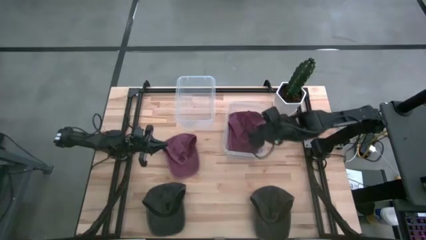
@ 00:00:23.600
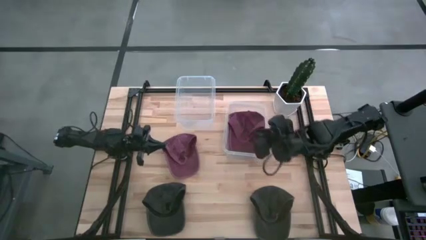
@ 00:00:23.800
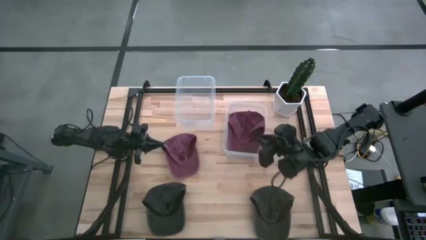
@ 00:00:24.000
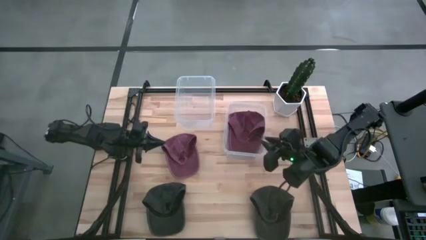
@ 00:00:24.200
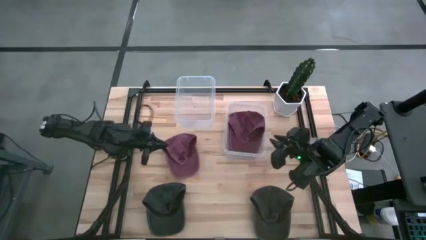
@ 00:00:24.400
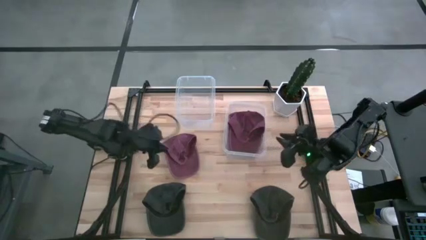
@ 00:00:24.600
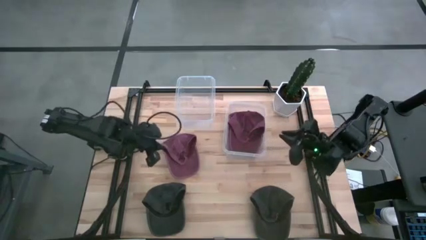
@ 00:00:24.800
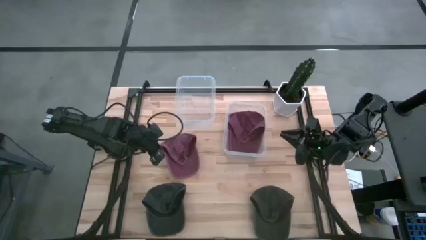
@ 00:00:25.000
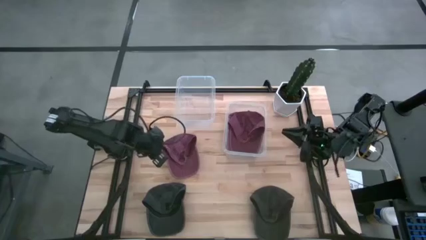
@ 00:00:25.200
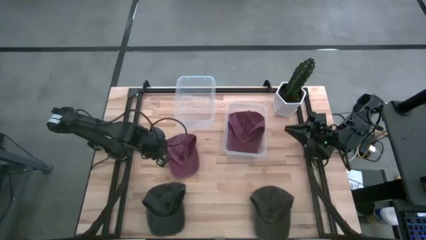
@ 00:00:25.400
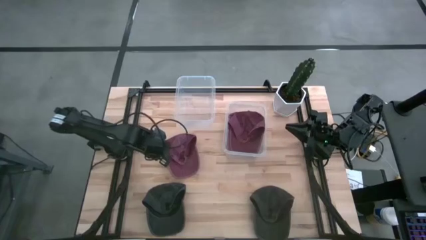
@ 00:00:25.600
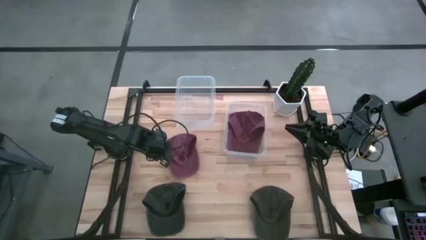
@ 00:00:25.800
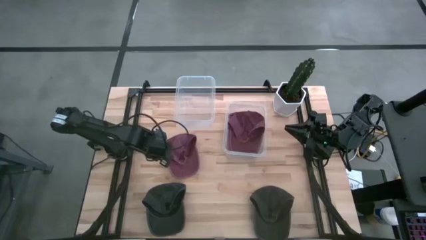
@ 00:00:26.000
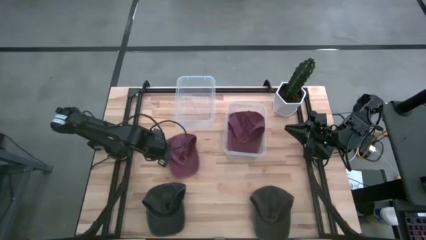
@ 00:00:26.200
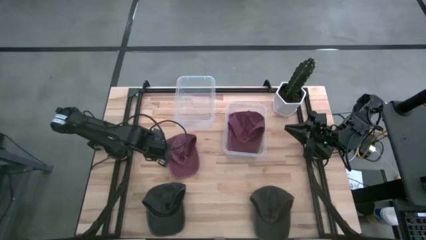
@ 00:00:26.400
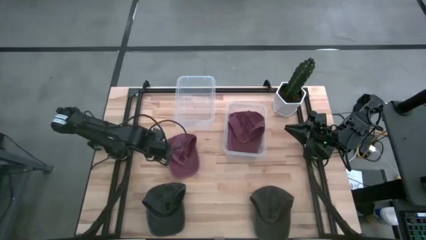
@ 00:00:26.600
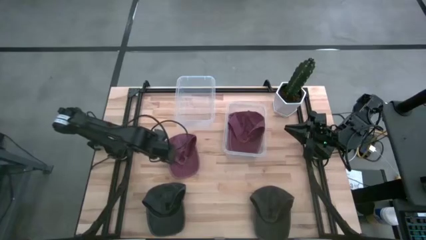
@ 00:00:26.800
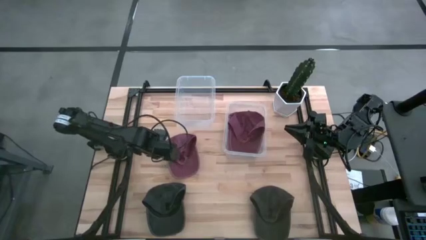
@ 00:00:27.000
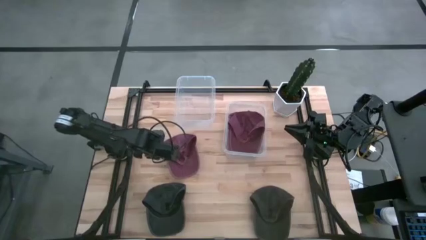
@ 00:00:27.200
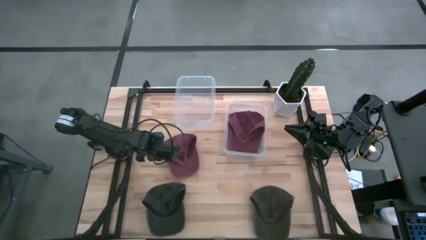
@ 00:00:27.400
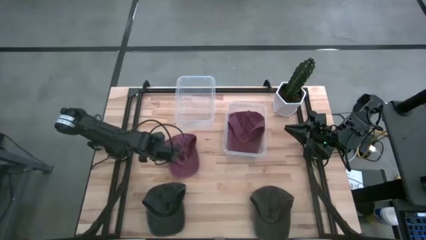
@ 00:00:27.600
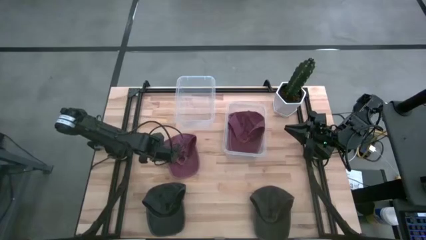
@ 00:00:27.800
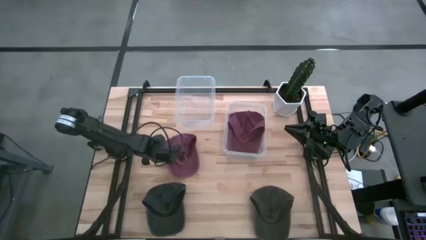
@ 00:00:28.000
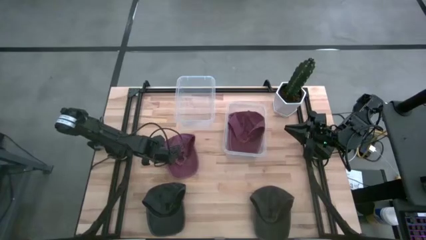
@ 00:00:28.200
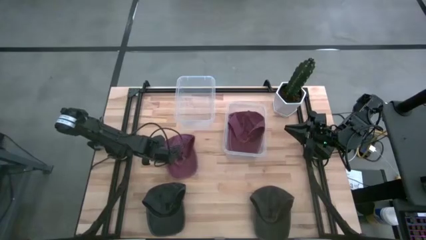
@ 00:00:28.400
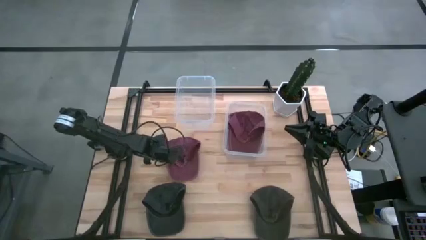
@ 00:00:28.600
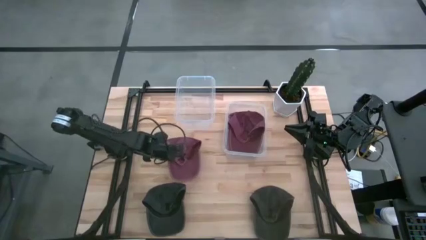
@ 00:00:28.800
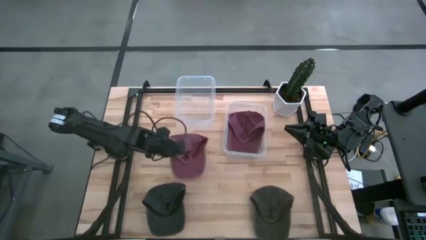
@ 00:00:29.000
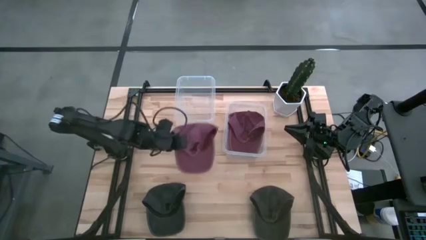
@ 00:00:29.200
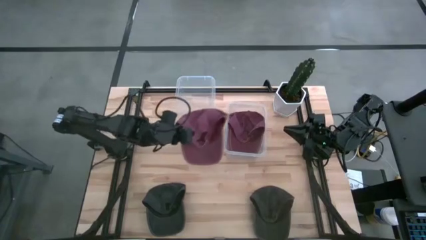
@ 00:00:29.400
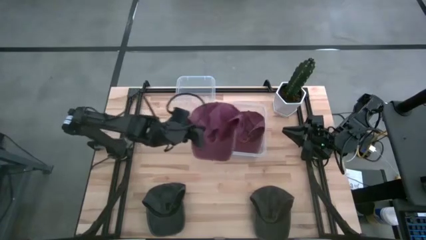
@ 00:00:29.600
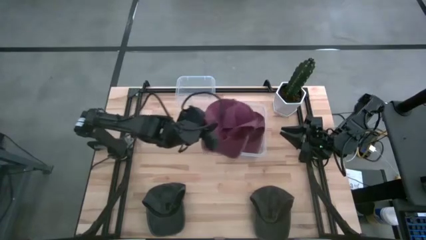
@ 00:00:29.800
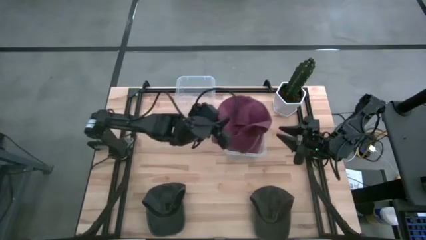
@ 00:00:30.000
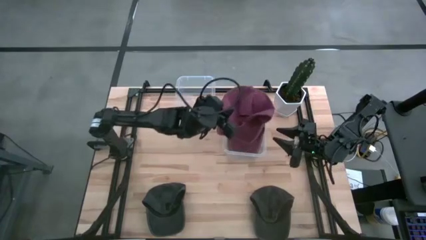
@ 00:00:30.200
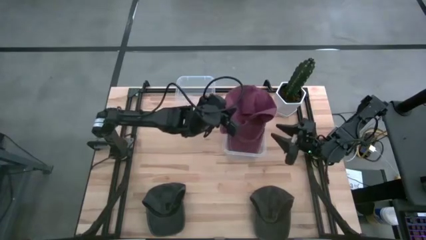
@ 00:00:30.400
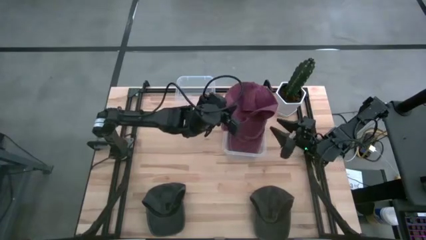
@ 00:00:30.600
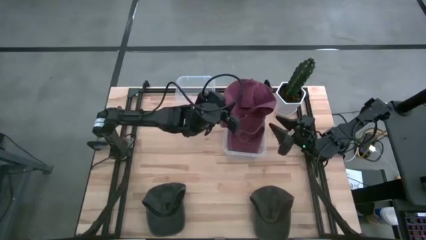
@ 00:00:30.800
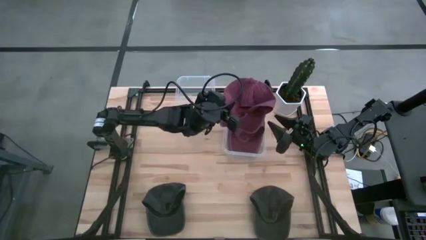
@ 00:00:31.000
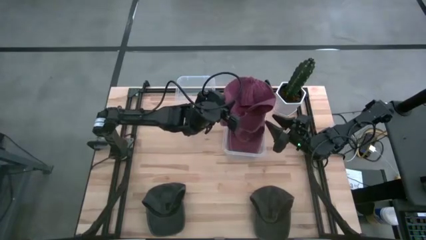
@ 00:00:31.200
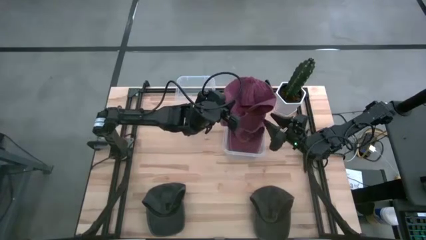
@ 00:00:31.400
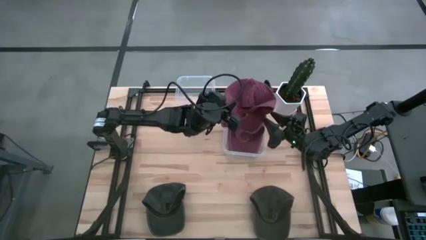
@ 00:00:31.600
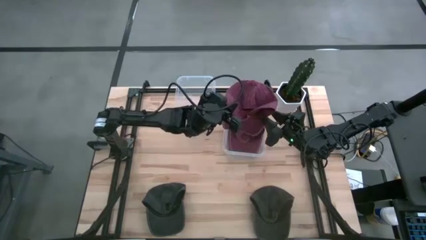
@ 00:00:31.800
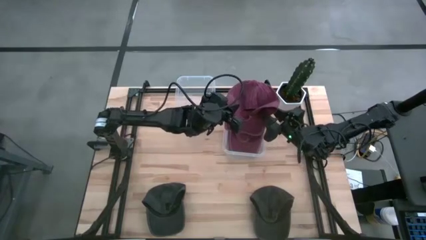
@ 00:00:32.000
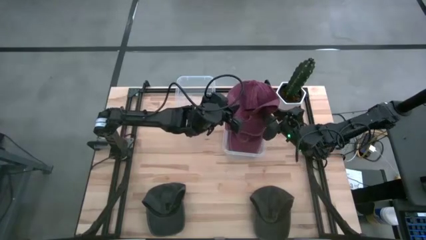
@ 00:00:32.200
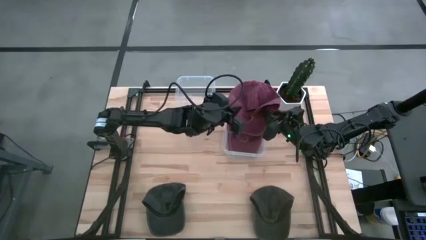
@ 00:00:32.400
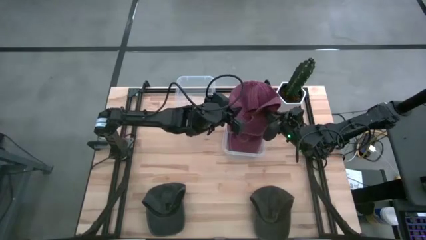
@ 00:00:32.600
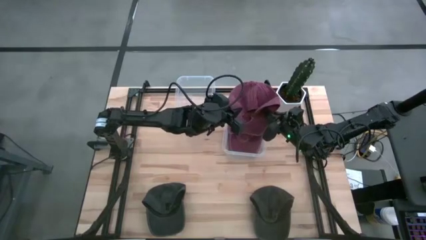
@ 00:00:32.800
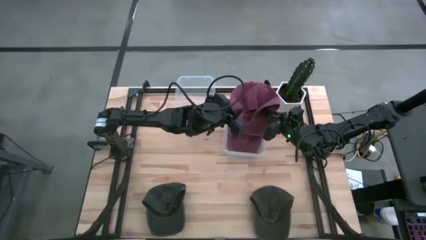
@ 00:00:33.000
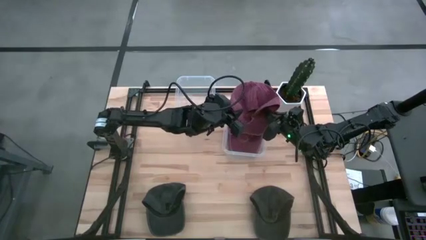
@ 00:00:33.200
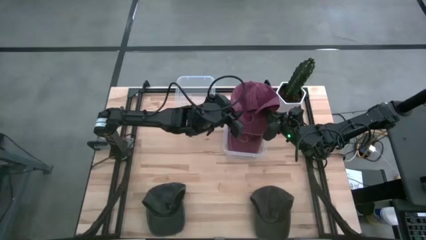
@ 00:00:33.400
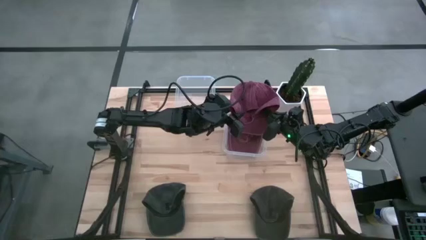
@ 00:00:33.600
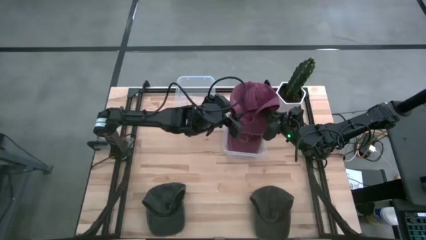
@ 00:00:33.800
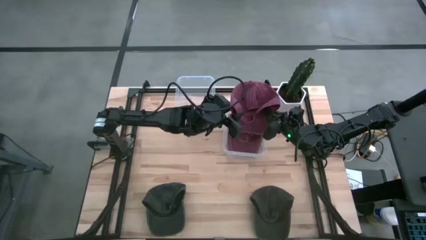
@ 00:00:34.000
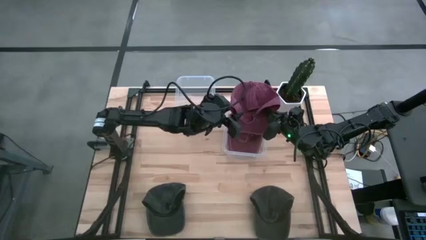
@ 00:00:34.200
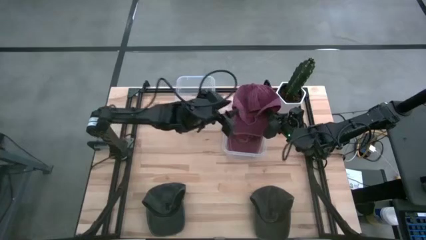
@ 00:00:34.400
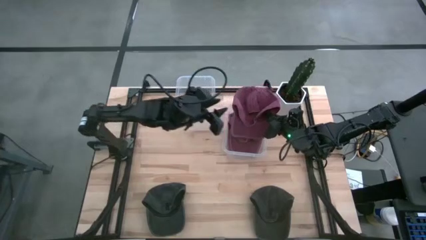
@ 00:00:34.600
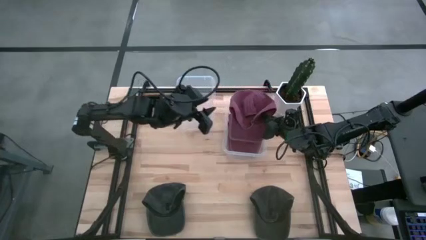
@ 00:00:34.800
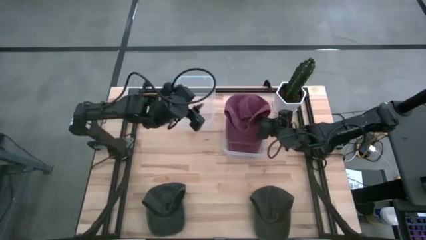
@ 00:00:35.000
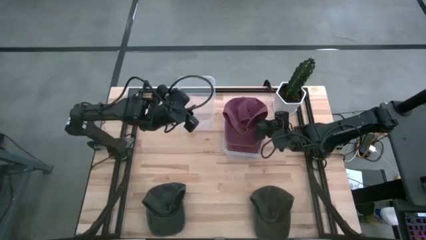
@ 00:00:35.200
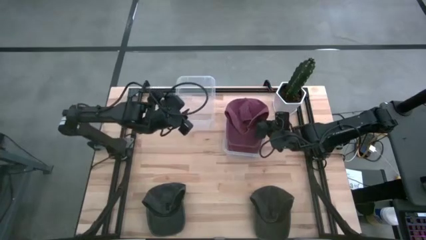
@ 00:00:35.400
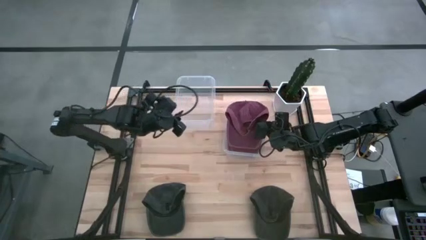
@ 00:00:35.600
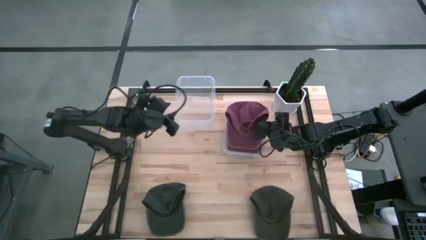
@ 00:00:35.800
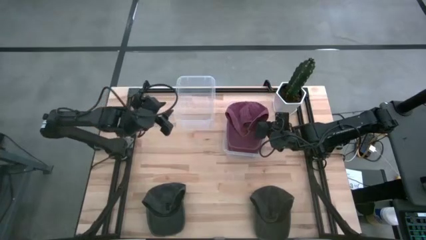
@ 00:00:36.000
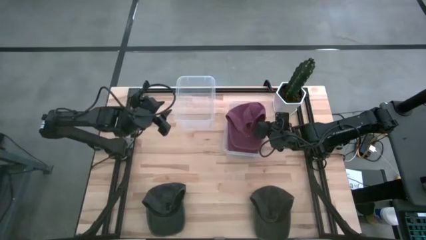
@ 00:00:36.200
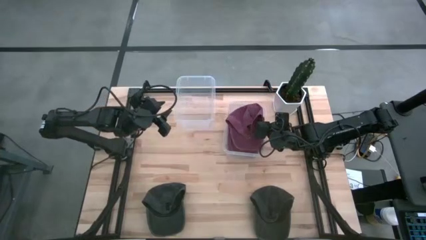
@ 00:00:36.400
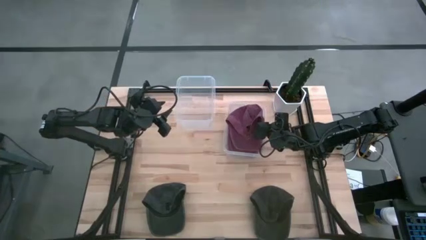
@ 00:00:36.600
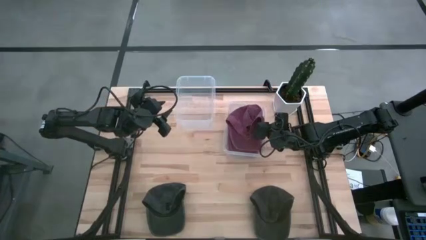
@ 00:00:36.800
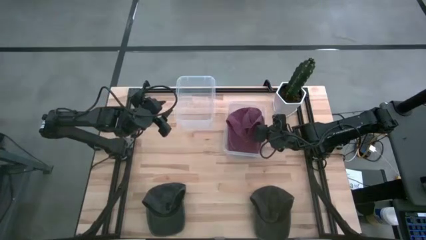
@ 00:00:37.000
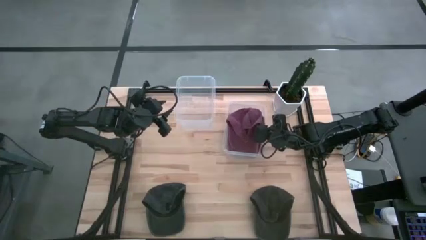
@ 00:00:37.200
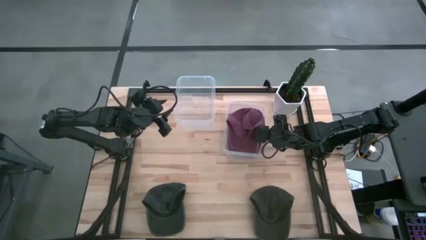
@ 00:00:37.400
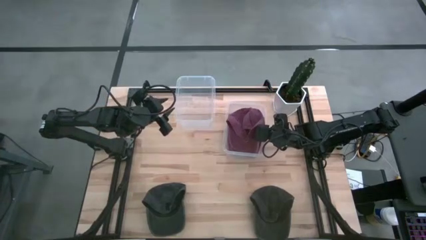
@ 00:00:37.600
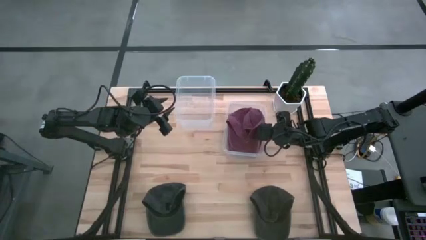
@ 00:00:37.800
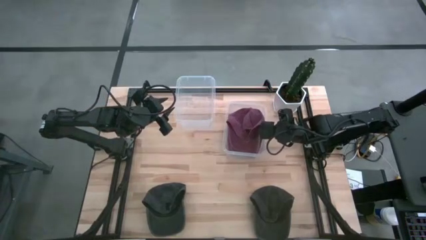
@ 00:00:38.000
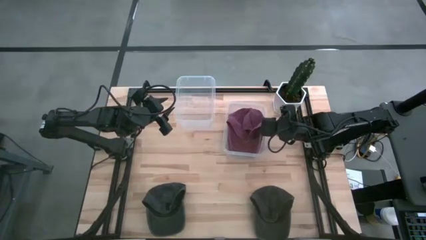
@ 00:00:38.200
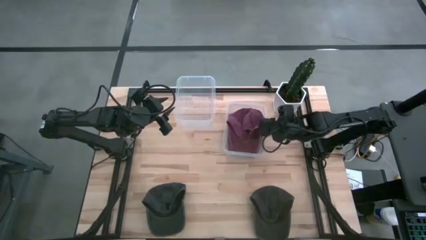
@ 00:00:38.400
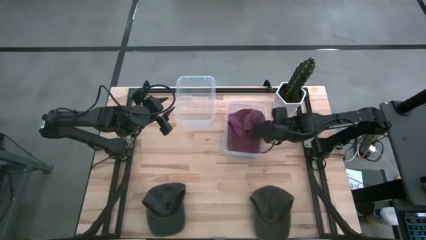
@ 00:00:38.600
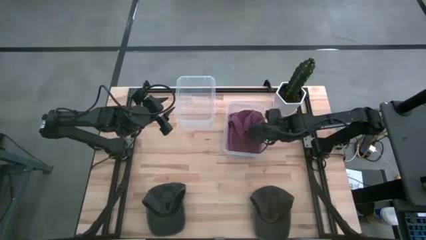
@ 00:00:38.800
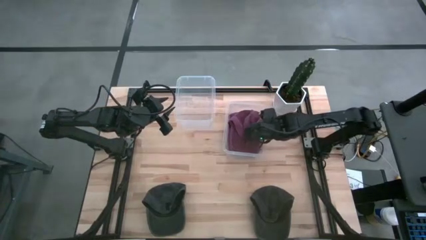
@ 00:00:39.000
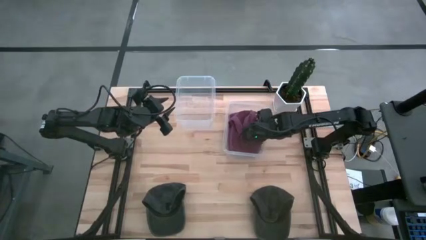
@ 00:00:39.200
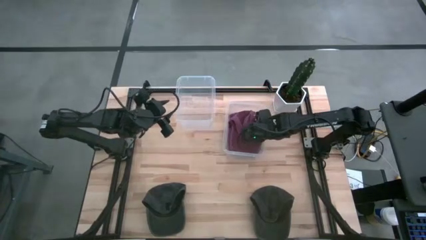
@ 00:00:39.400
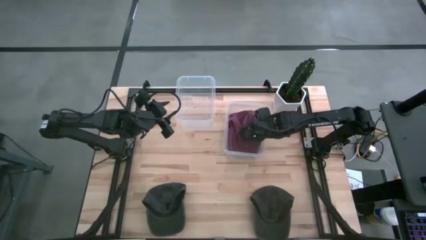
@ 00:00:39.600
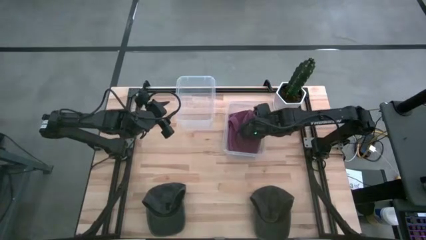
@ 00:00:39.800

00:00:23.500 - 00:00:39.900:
Task: Pick & Place hat
Put the red cap into the right transparent bin
